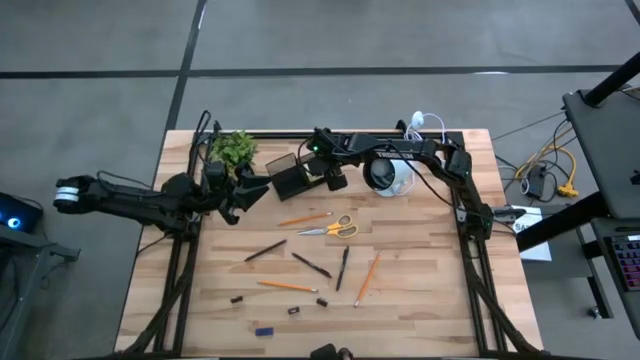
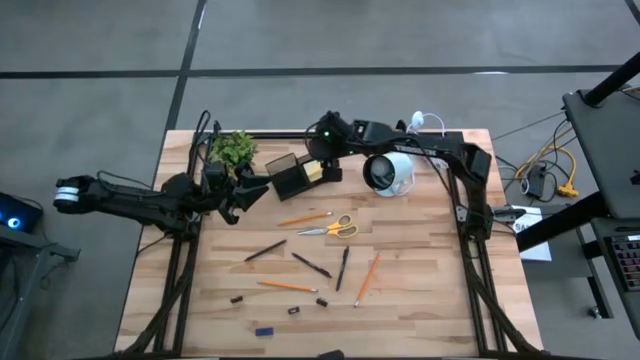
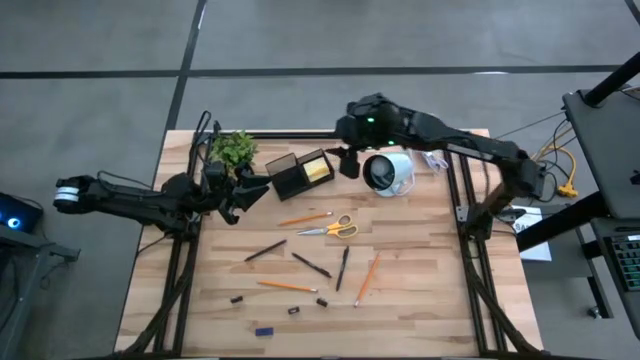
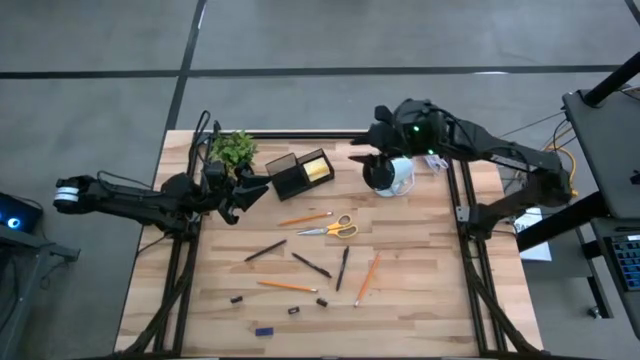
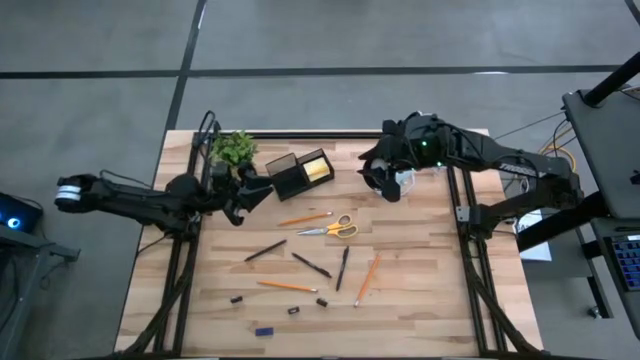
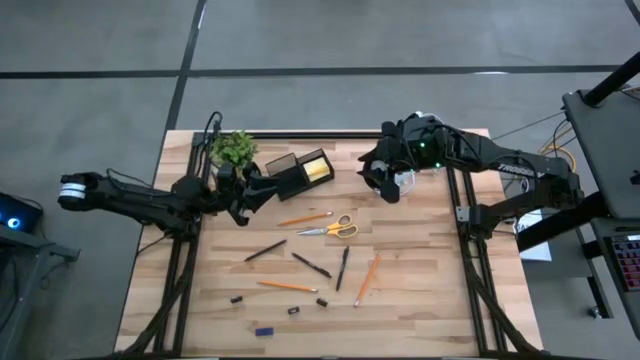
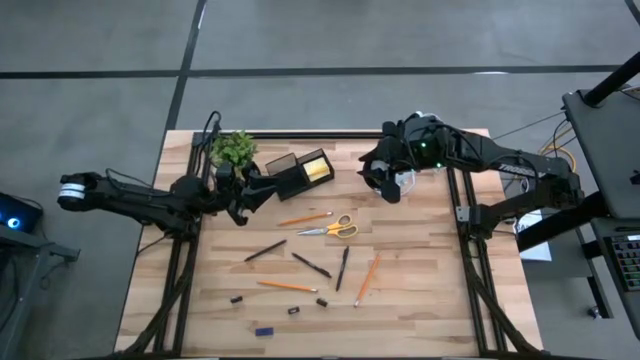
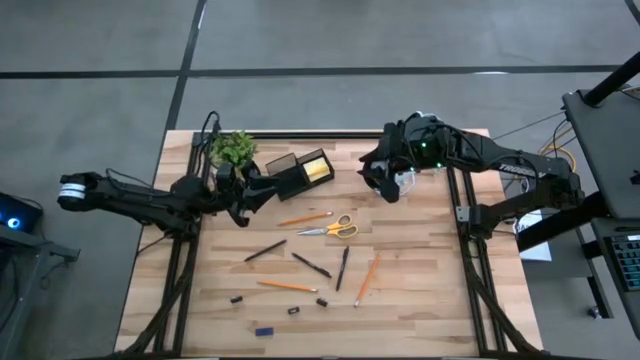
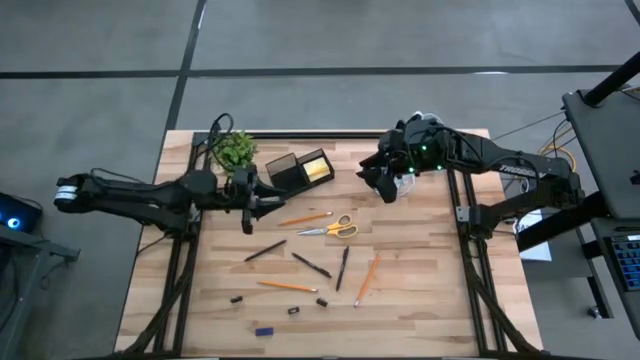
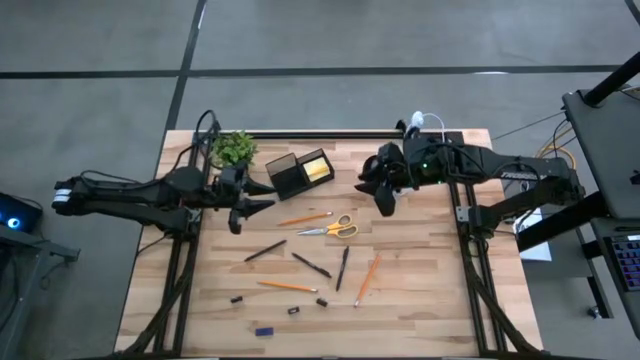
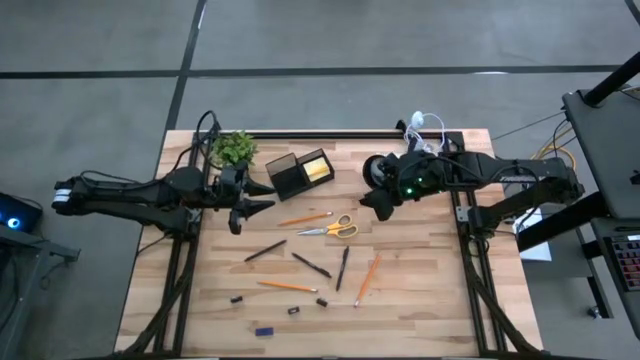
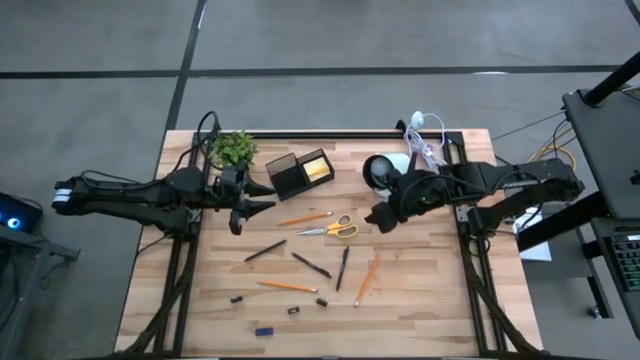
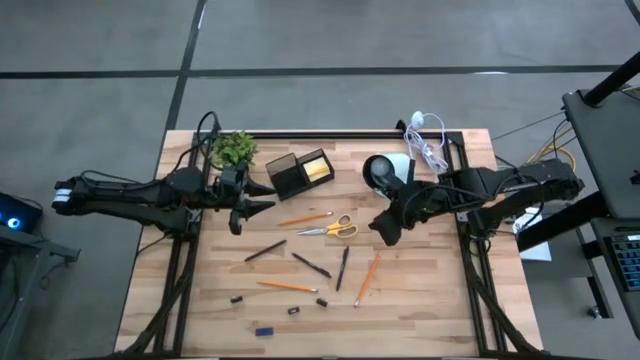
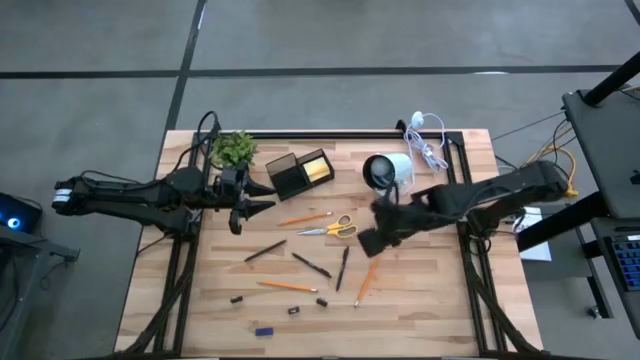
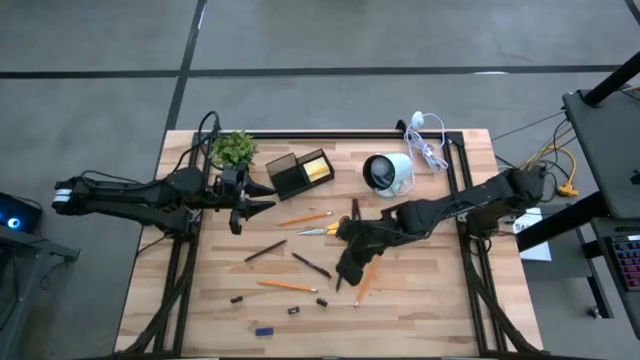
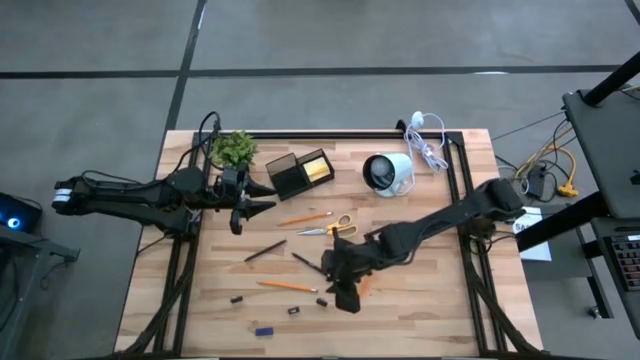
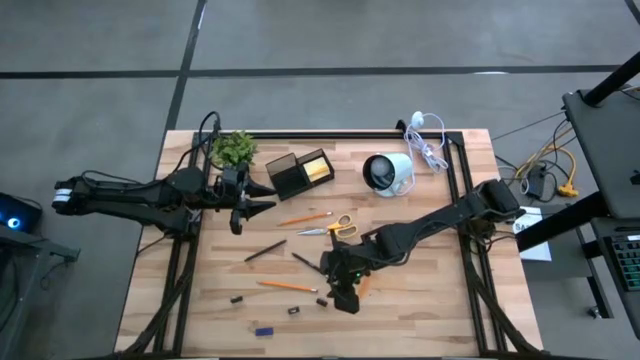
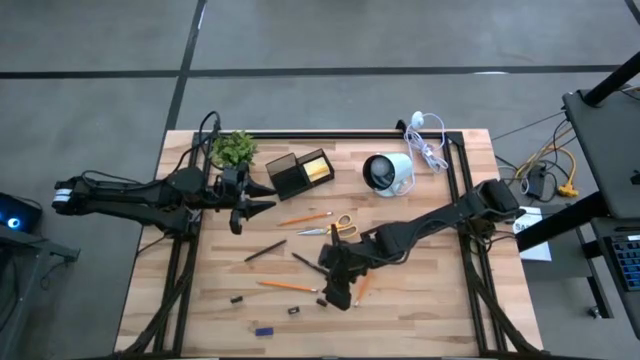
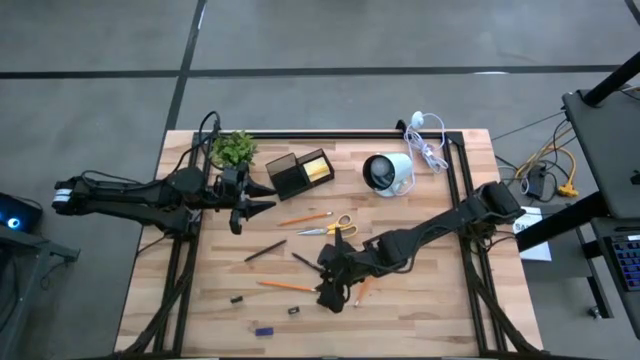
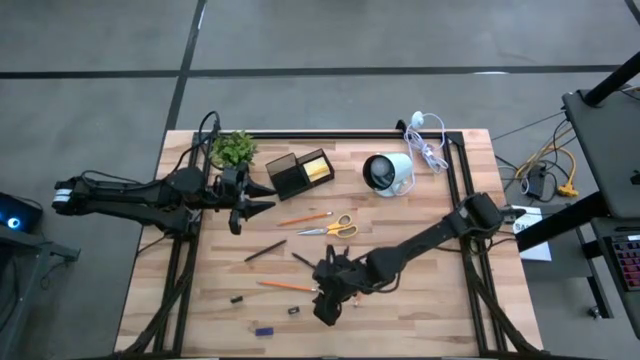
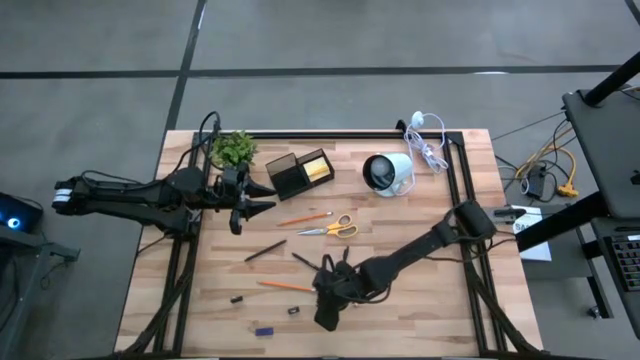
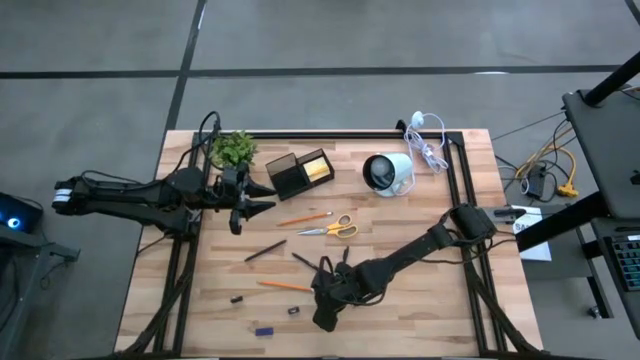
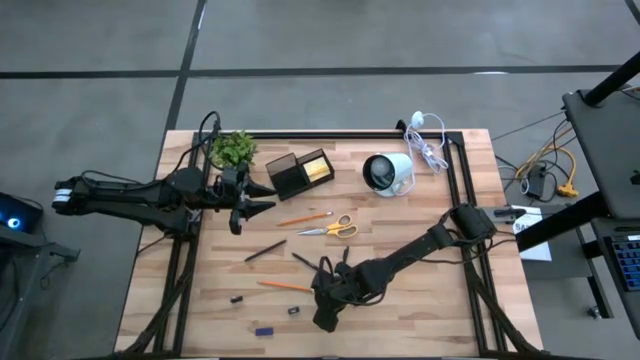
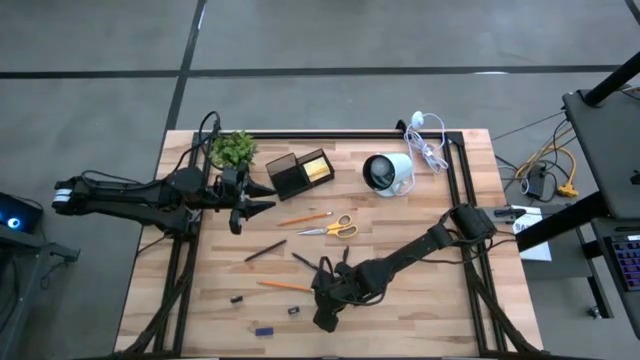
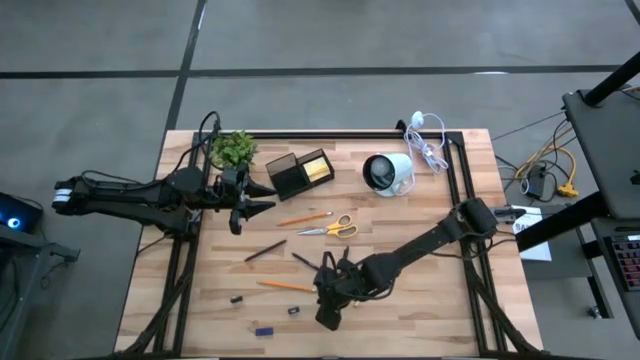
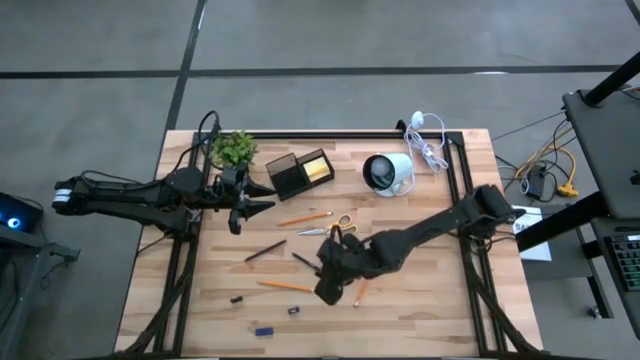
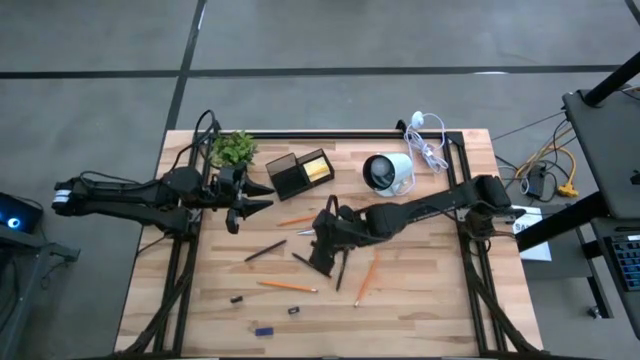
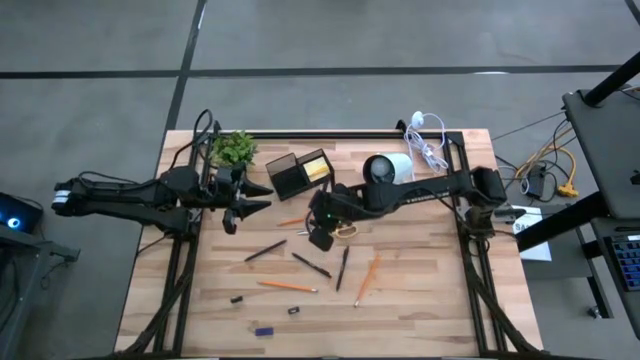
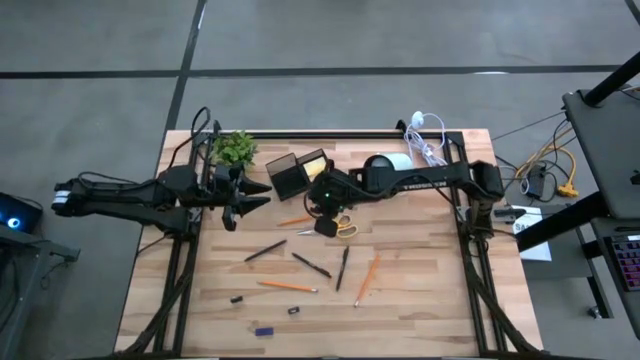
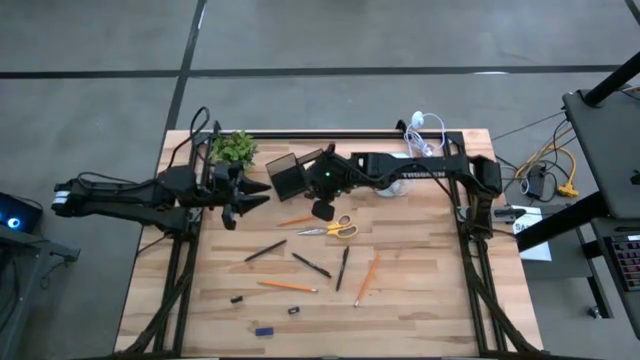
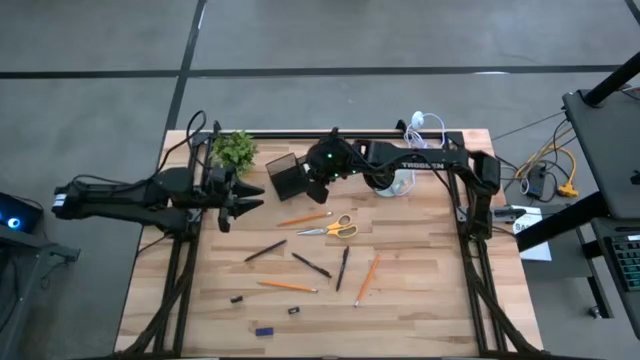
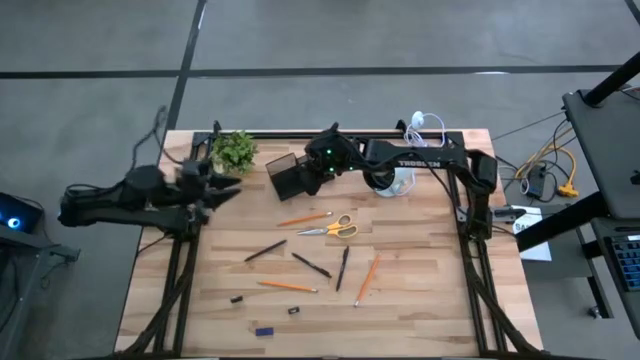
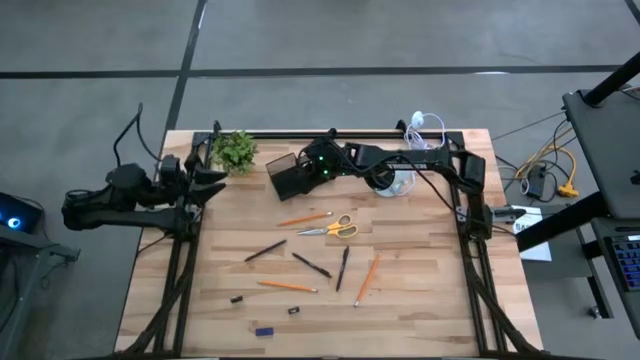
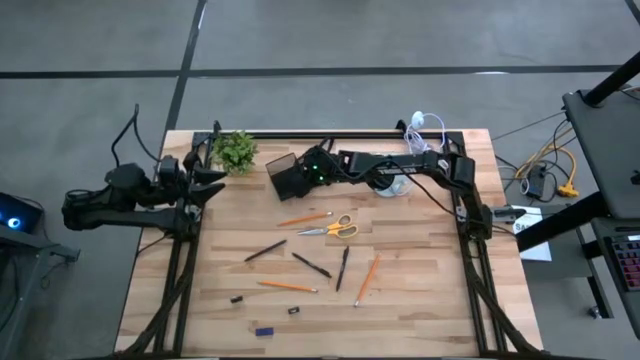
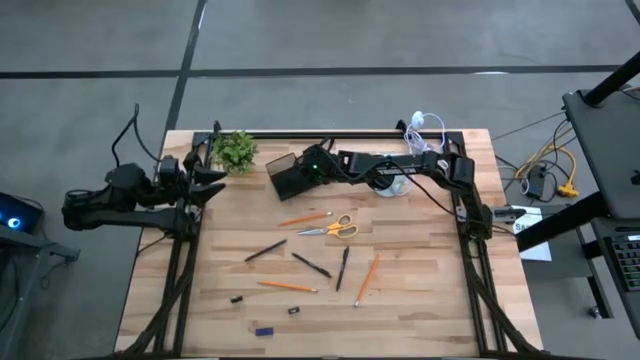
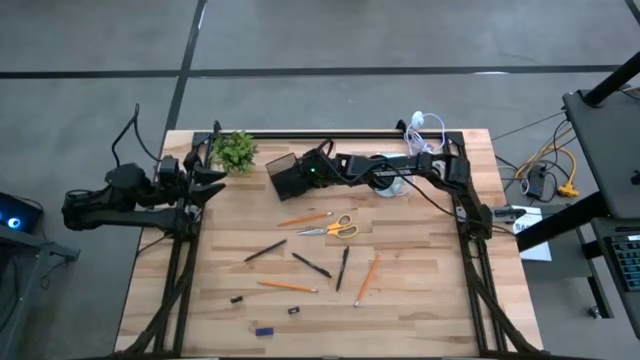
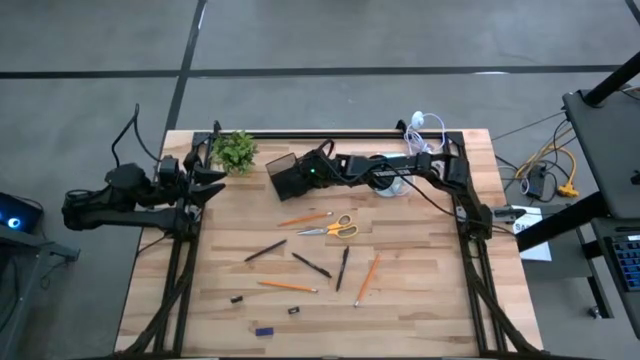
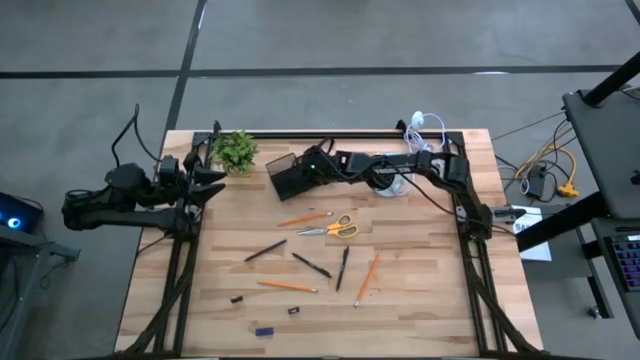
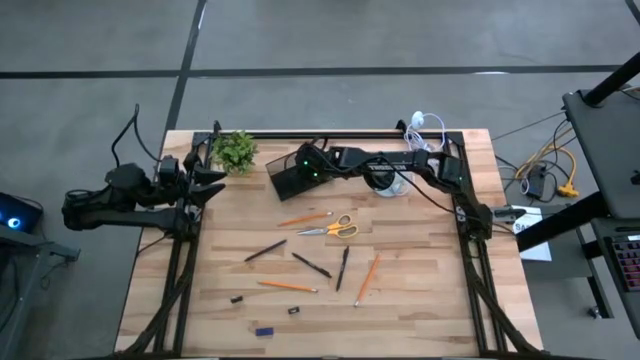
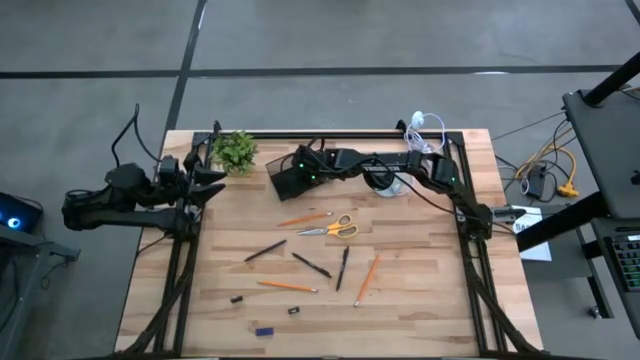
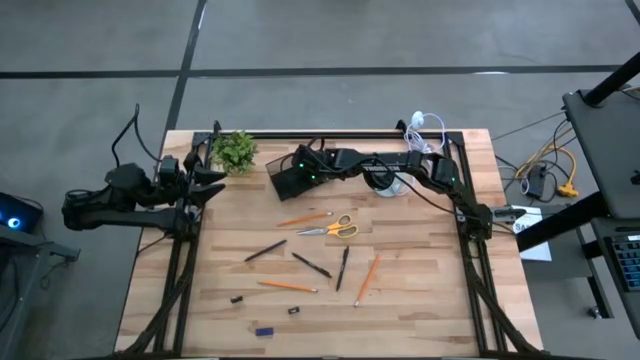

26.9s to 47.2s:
Task: Pick and place office supplies into organizer
Put the right black binder clip into the black desk organizer

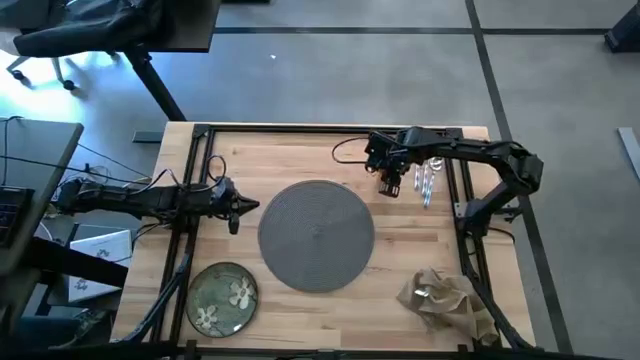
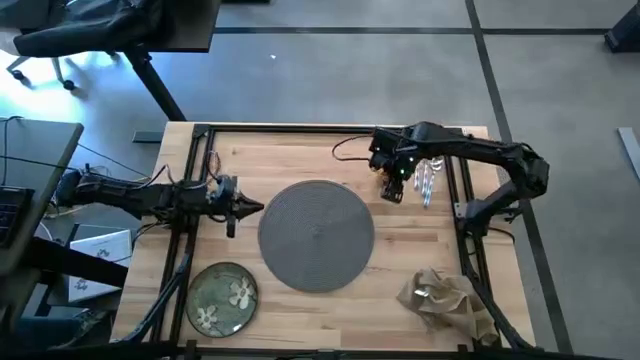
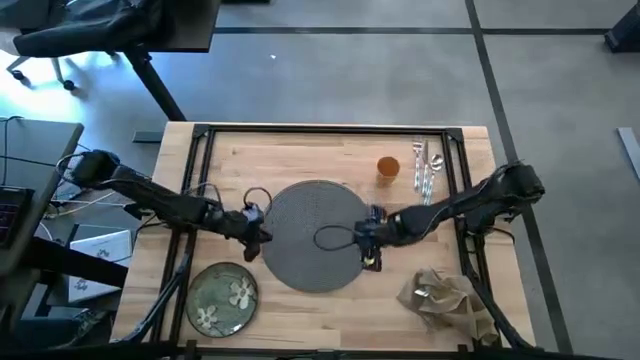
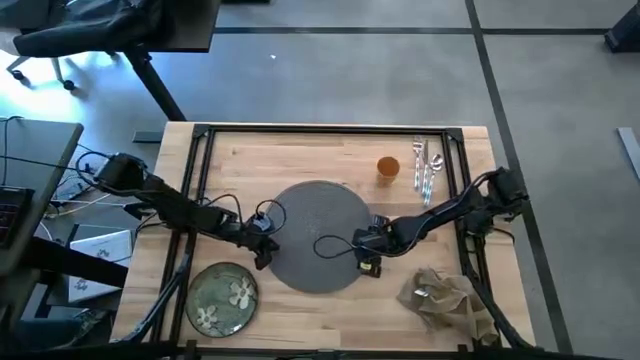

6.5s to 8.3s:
Task: Set table place
Adjust the gray table mat
